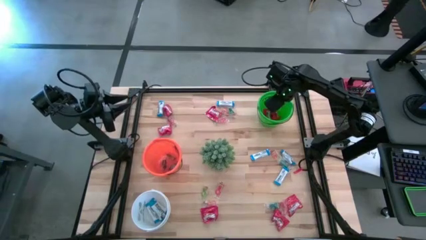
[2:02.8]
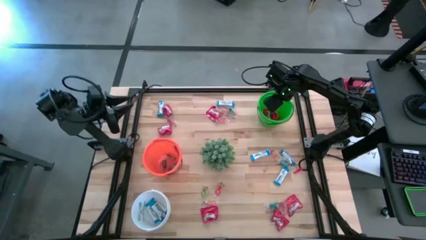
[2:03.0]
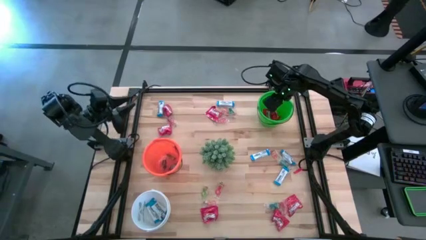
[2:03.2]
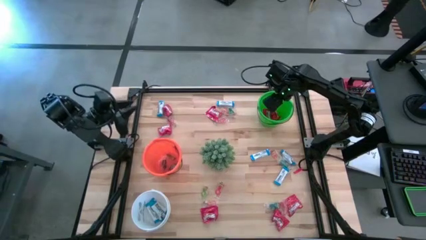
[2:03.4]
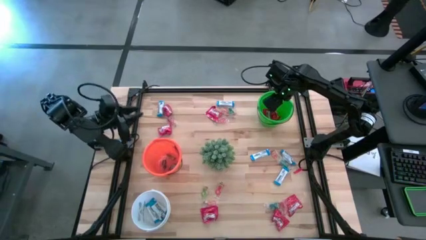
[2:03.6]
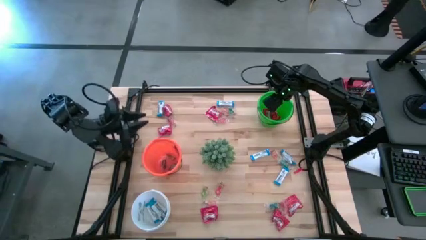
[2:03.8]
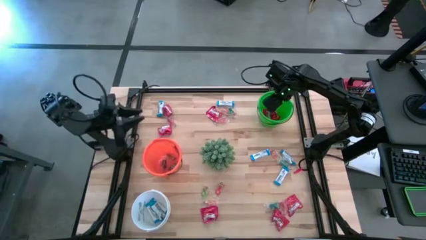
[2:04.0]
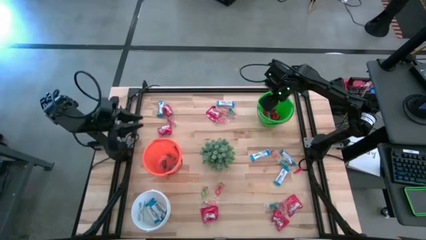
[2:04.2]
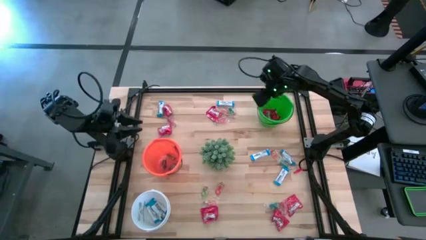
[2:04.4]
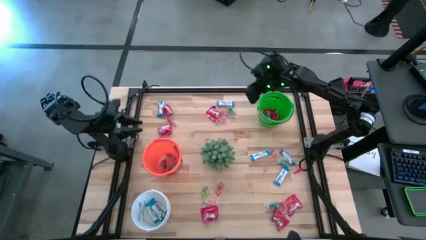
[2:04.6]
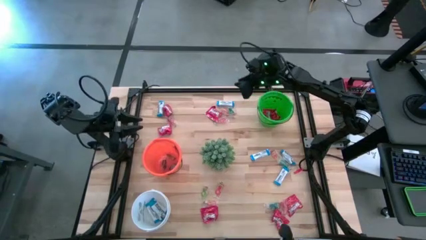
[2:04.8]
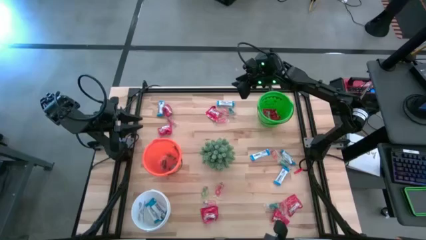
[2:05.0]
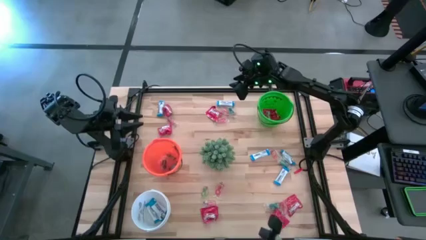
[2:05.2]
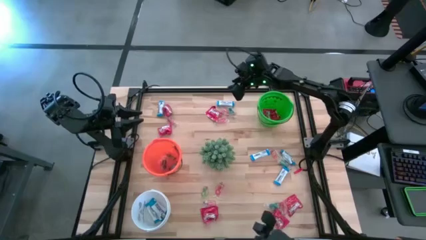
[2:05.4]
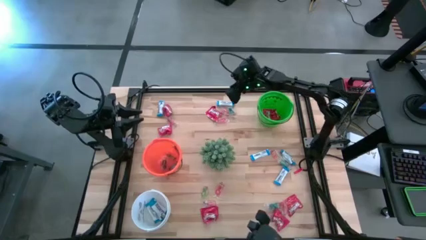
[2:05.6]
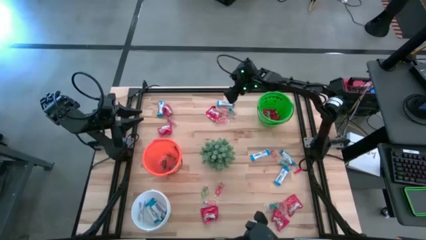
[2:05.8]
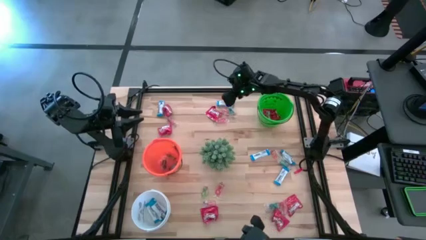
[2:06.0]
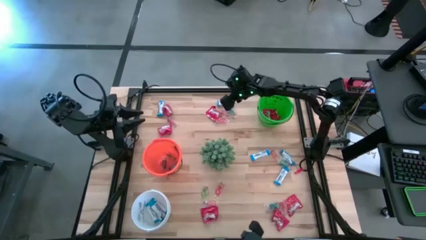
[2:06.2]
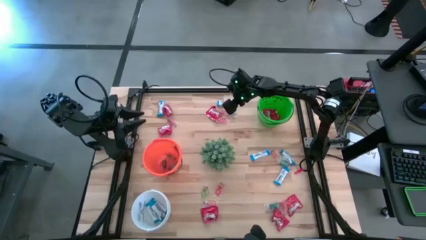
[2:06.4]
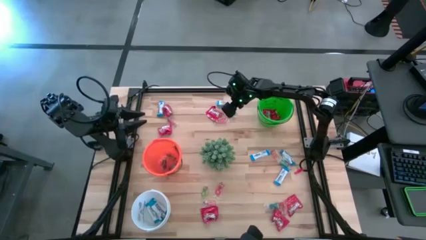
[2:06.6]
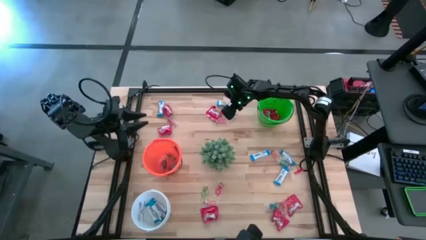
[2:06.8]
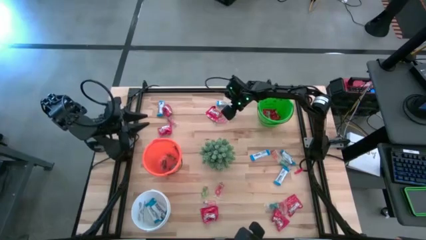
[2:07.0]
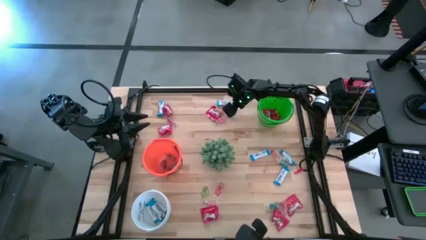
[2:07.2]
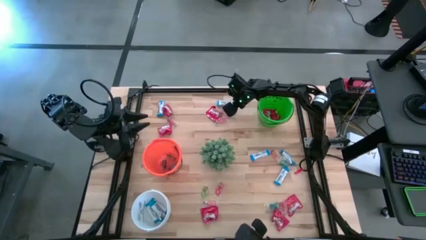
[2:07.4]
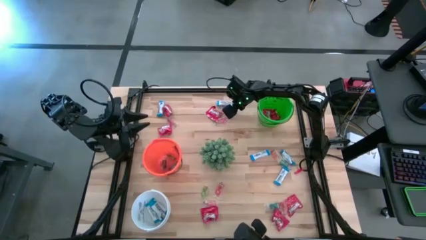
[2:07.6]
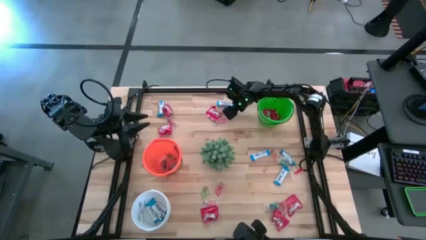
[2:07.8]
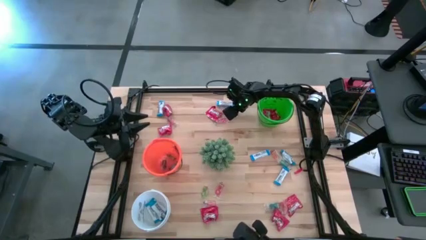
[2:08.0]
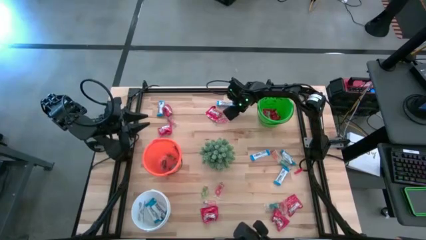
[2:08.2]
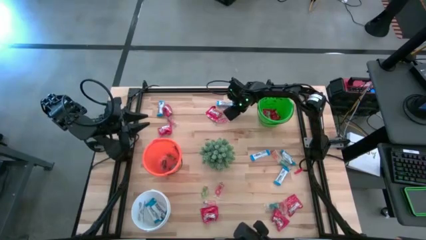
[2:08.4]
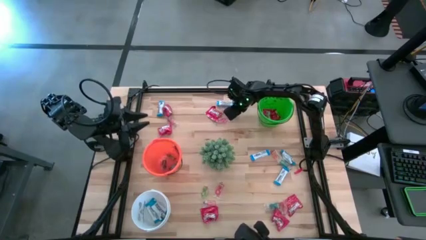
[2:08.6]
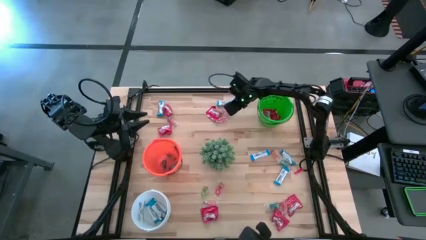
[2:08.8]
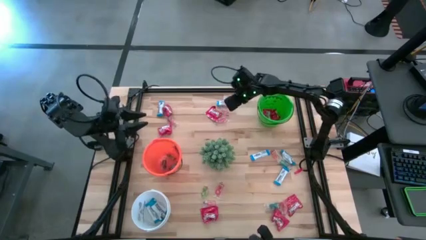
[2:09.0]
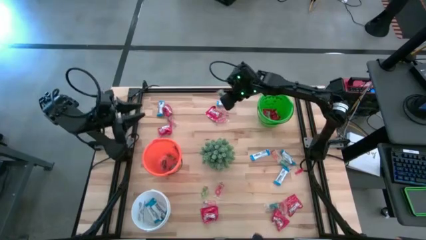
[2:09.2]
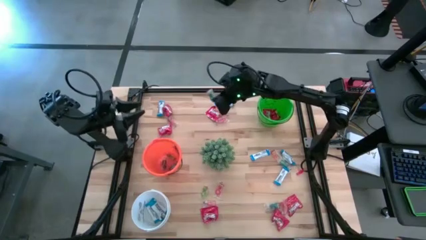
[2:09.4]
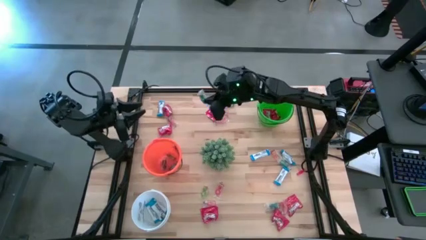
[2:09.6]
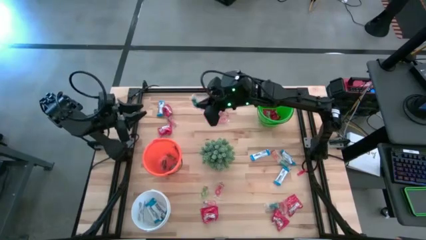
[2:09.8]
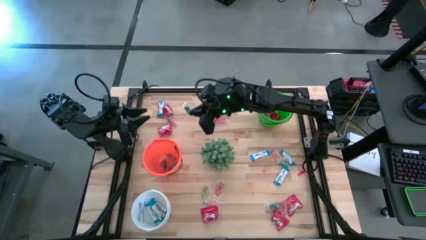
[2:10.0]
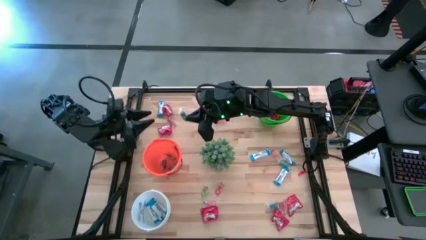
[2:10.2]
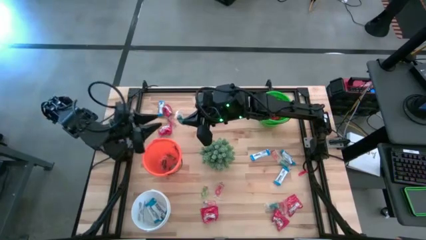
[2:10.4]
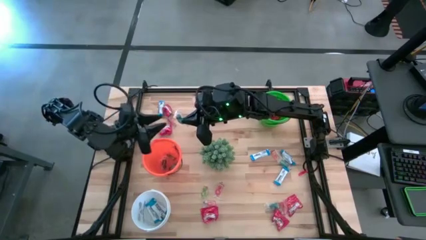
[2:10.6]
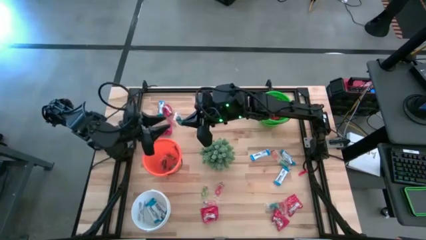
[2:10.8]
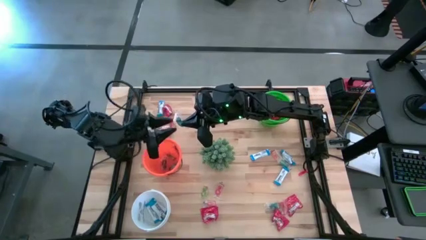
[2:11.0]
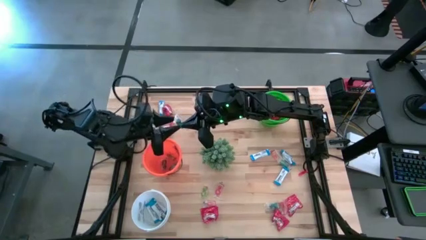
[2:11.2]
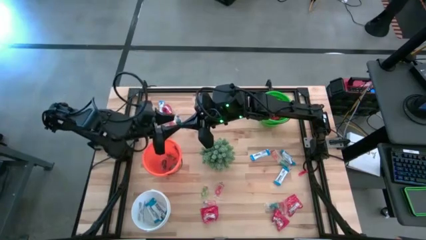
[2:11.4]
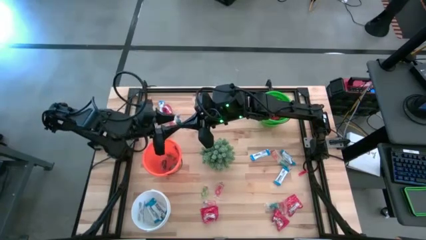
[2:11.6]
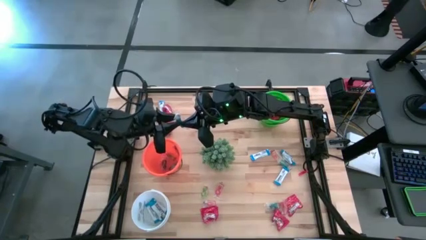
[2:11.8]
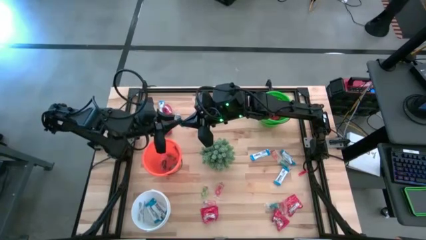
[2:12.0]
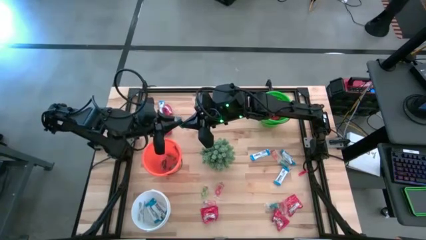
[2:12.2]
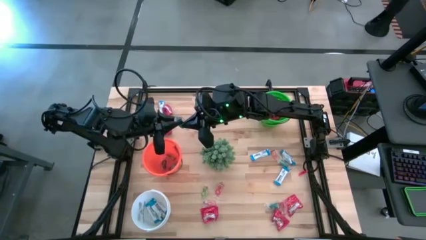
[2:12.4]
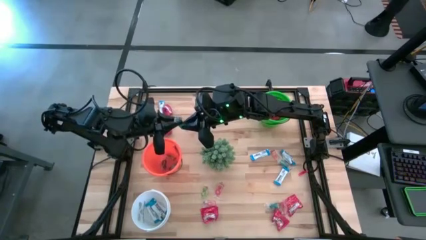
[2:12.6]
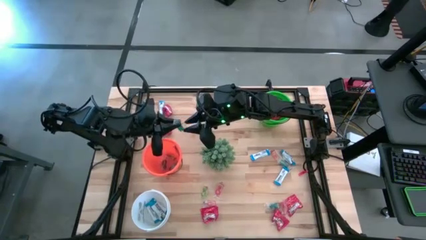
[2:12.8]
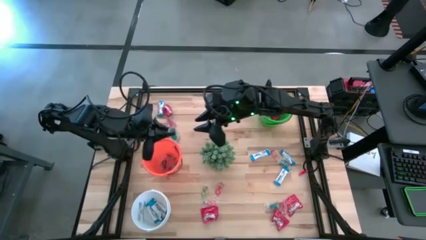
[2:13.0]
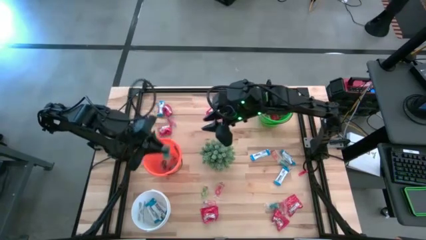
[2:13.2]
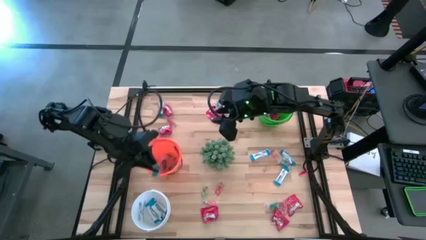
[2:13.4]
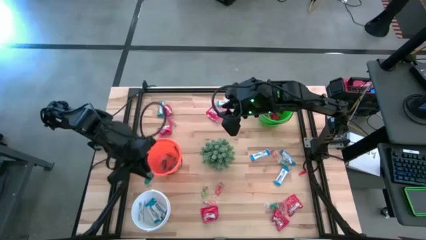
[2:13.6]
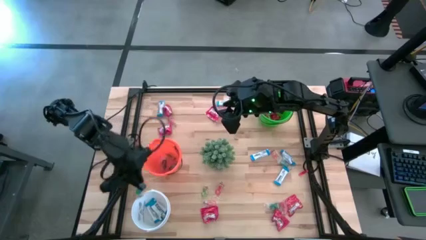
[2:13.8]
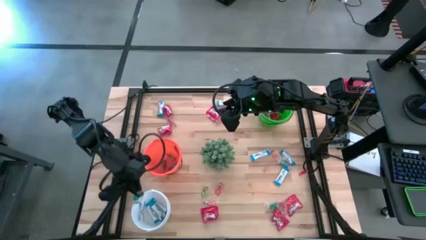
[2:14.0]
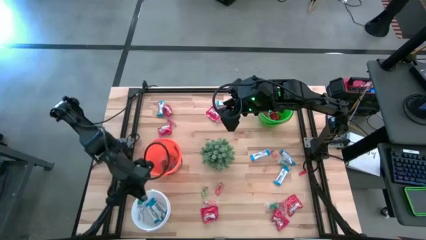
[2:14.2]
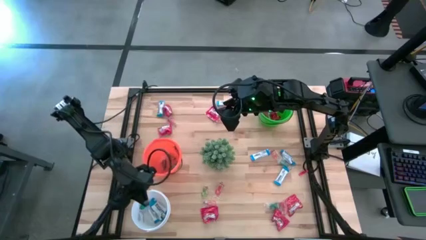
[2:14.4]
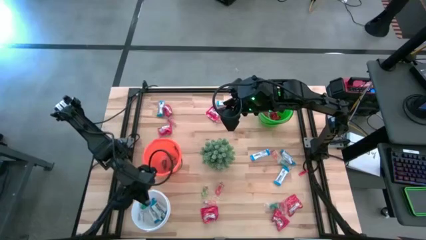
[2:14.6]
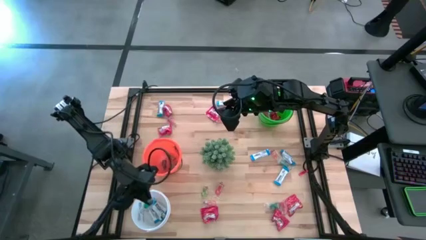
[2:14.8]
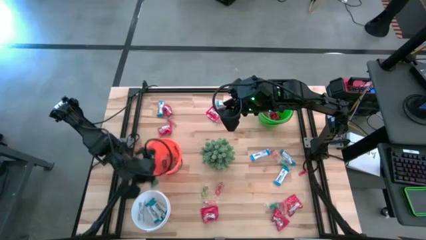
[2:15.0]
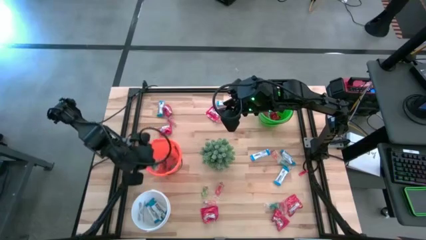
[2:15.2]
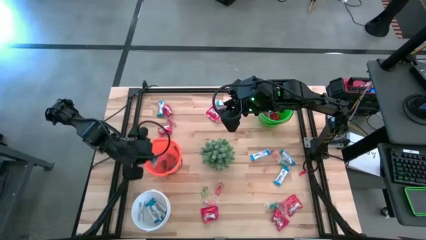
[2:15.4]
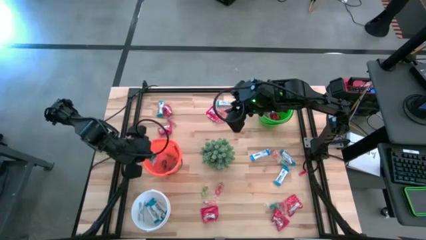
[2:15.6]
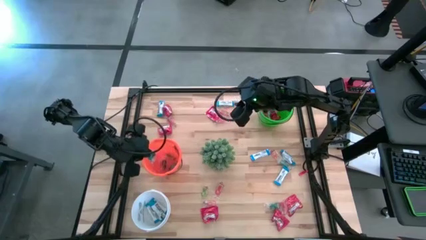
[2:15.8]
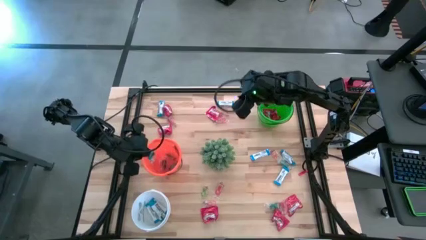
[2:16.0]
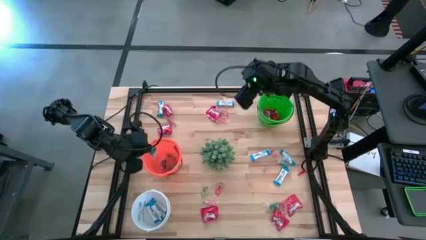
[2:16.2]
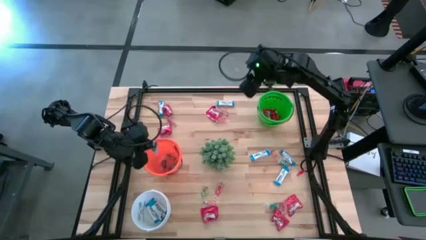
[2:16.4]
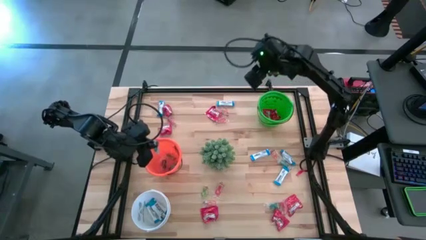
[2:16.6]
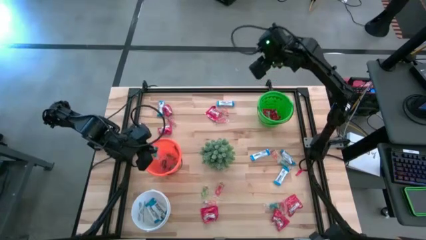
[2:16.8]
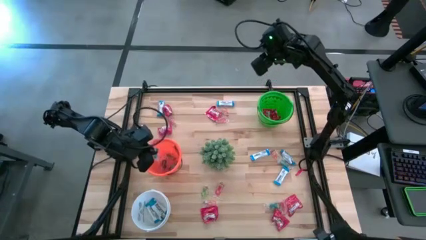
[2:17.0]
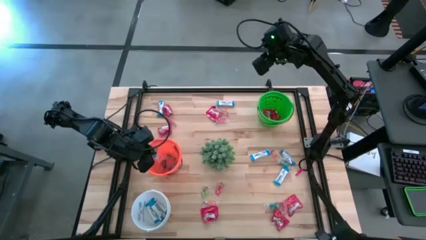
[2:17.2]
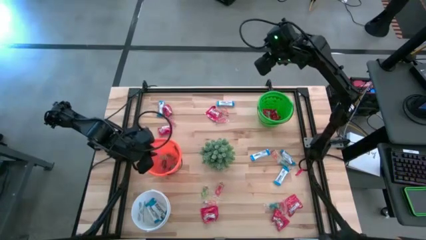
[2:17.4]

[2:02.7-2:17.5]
Task: Sort candy
Put the blue gummy into the orange bucket

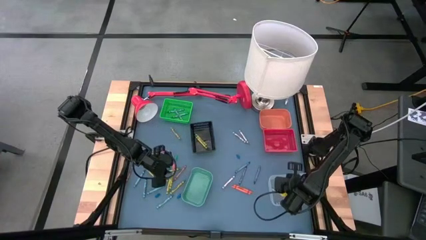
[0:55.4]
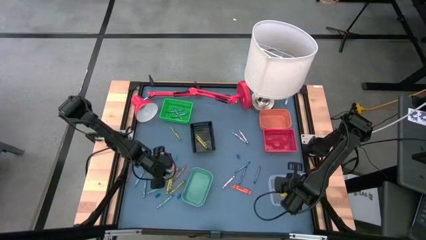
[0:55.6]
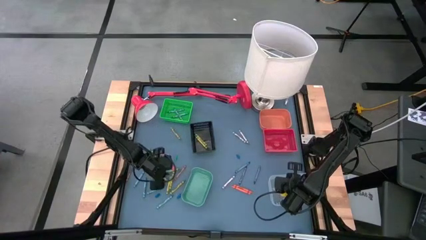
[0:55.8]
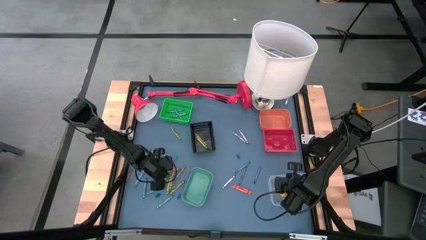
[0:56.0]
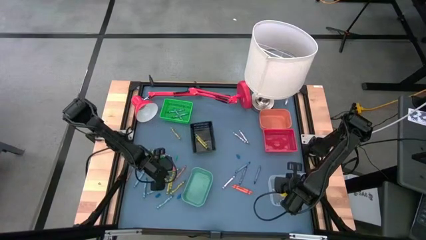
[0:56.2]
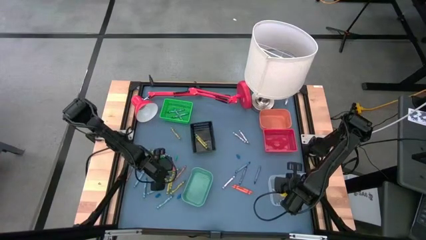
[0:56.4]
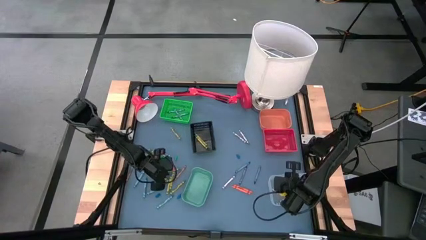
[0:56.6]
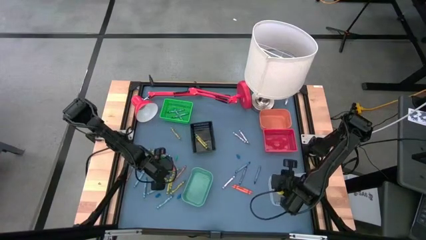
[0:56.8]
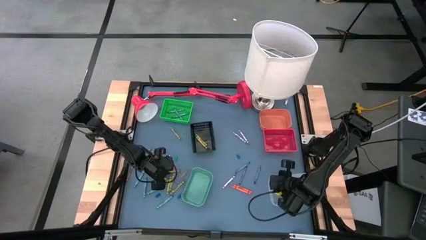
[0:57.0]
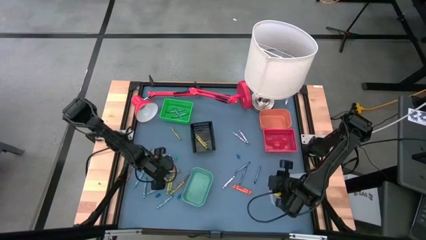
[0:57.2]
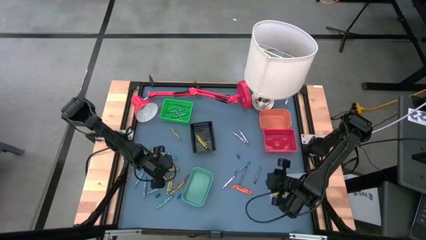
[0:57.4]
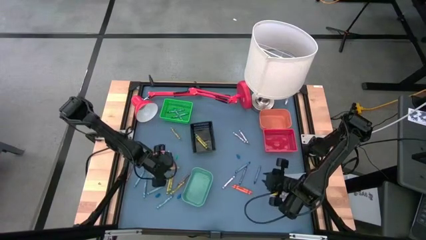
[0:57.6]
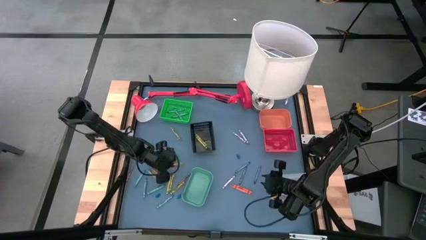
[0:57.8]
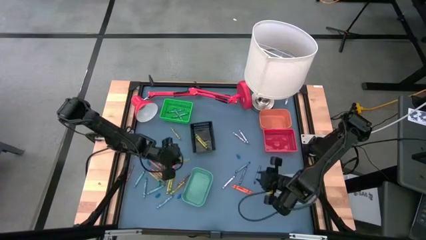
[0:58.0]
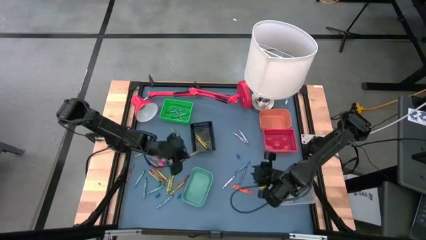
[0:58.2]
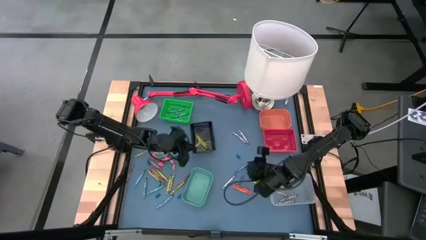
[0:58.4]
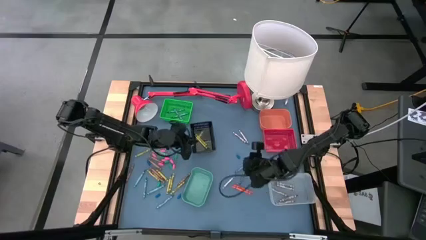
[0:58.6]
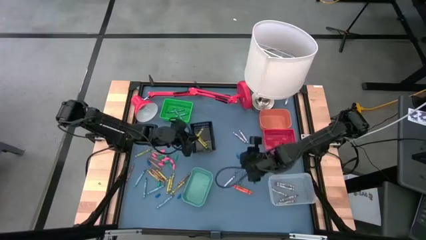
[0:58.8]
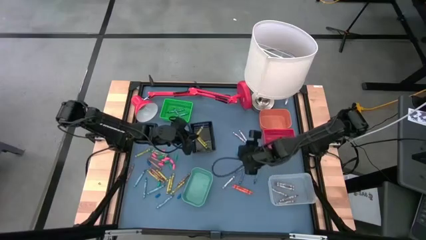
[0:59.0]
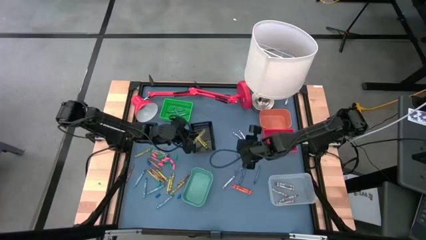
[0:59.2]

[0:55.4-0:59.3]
Task: Sort crayons
Put the green crayon into the black bin
